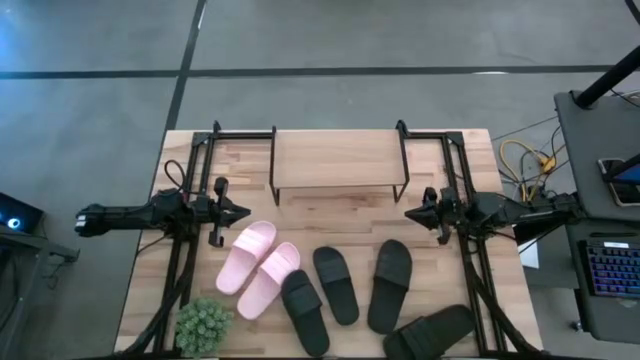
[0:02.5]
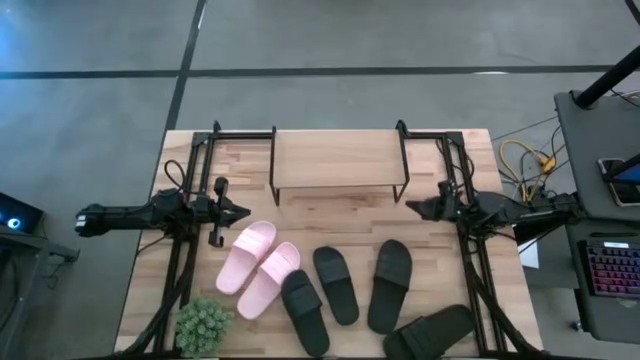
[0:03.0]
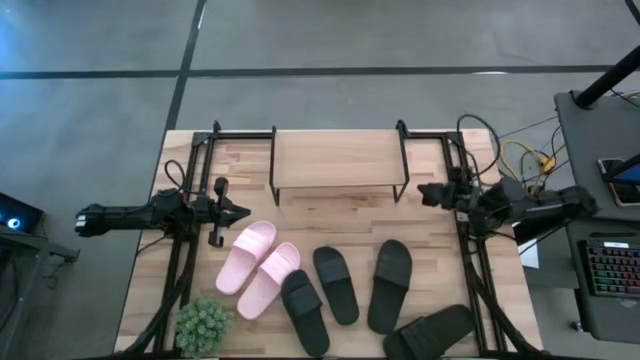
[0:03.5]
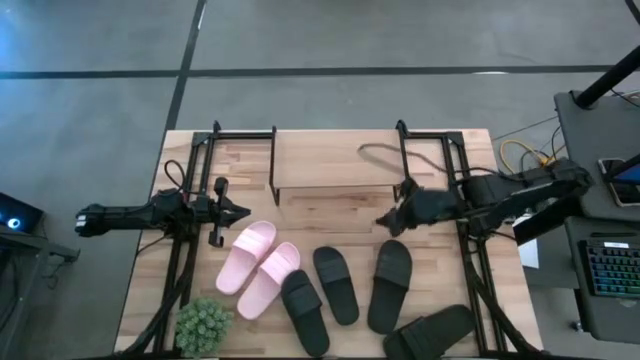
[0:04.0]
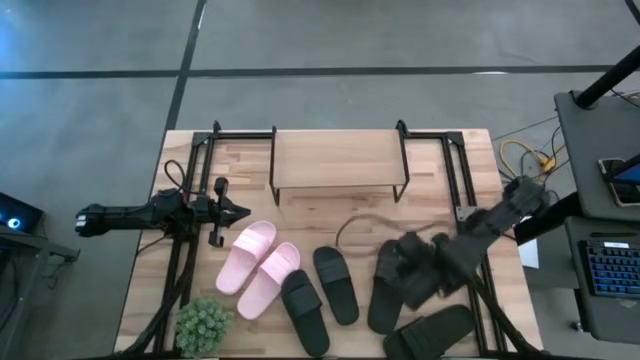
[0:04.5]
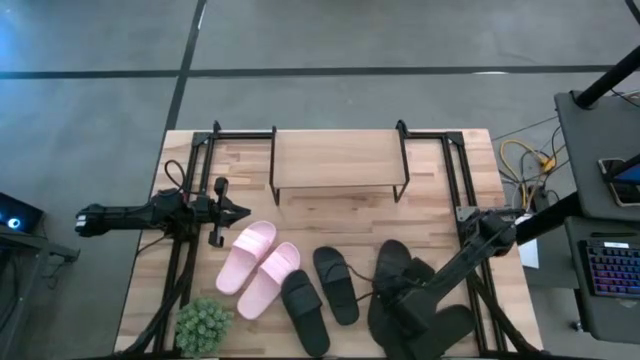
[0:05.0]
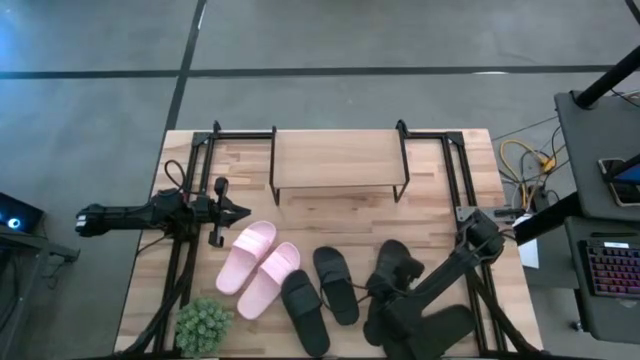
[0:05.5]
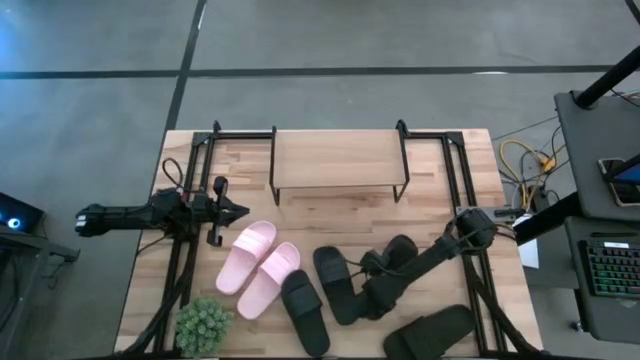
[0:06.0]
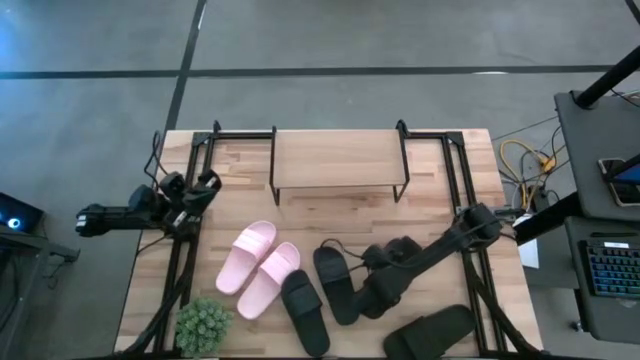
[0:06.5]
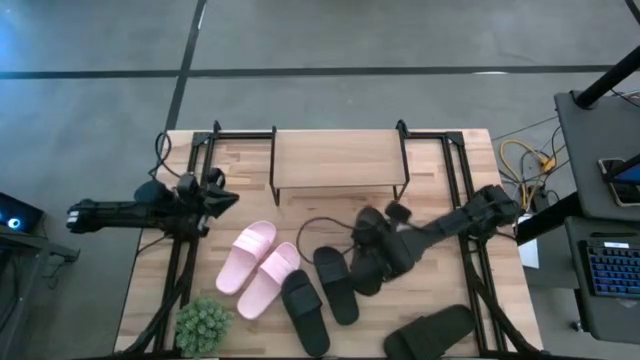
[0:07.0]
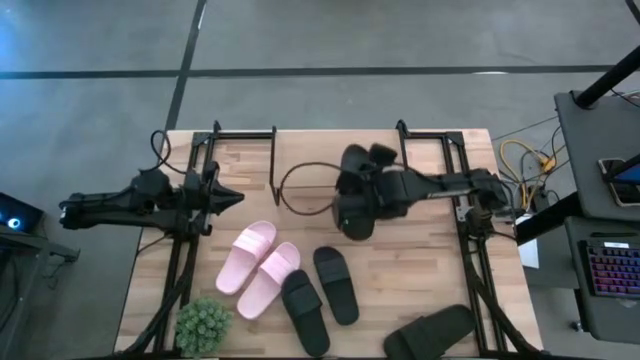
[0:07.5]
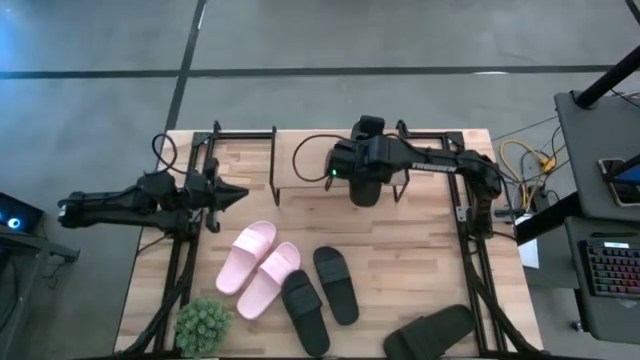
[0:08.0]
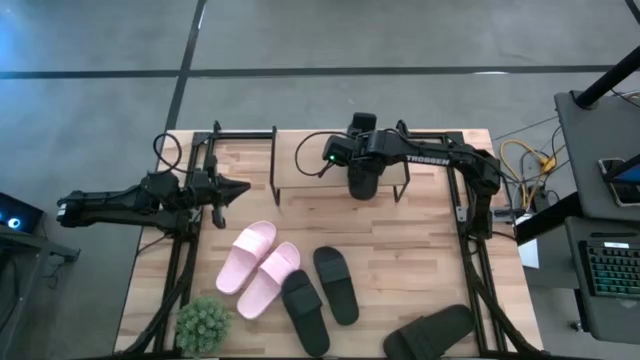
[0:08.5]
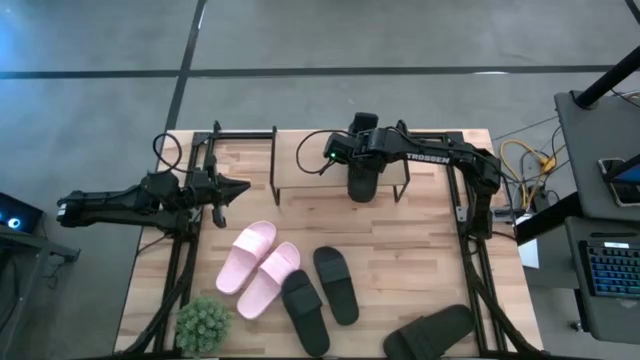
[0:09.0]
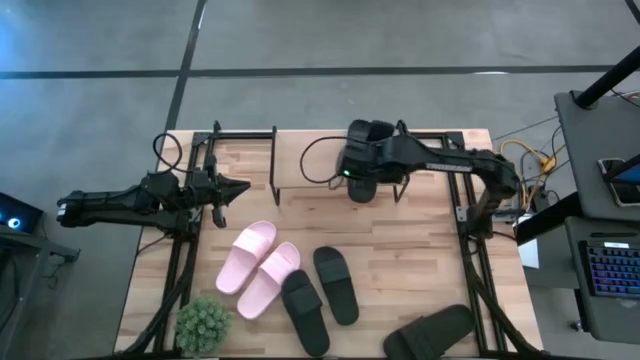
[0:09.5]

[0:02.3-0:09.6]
Task: Pick and place slides into the shelf
Put the black slide on the shelf

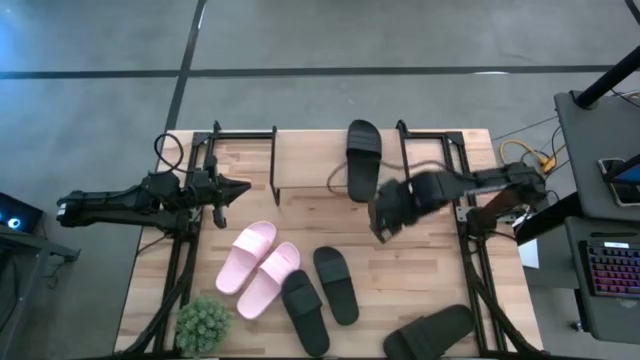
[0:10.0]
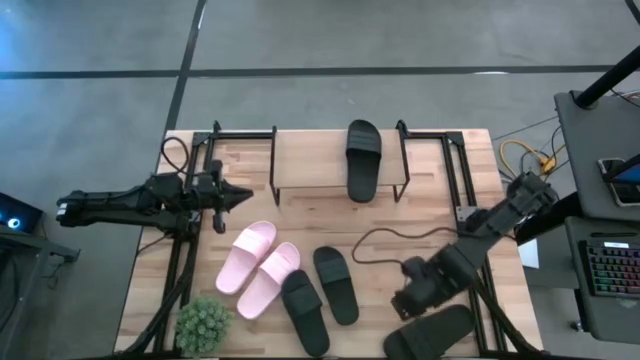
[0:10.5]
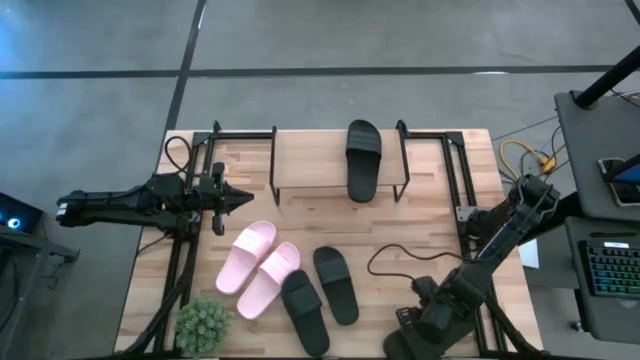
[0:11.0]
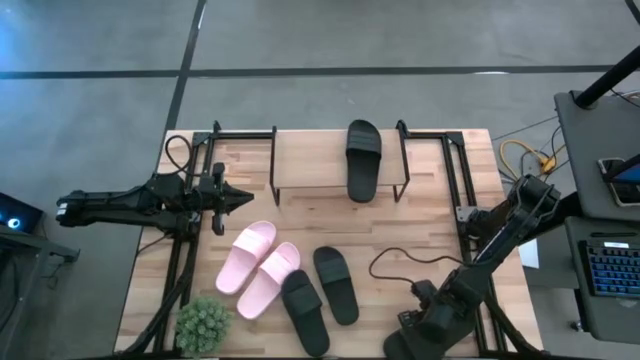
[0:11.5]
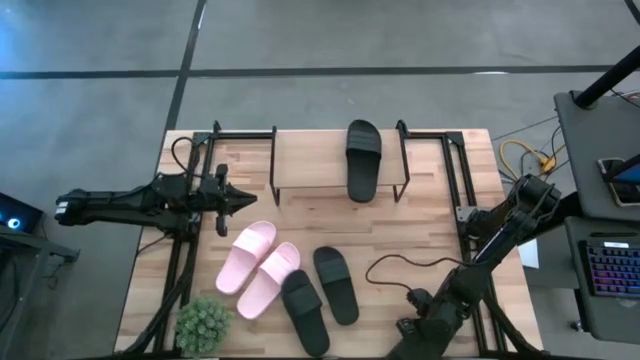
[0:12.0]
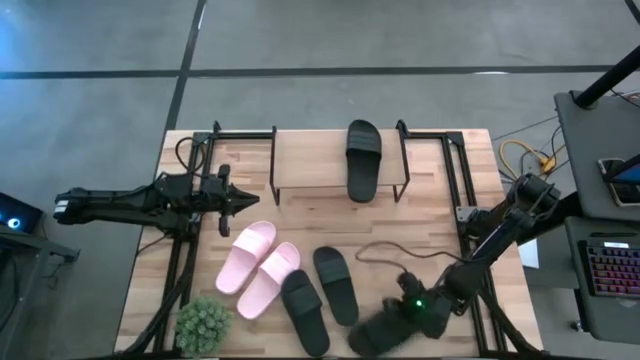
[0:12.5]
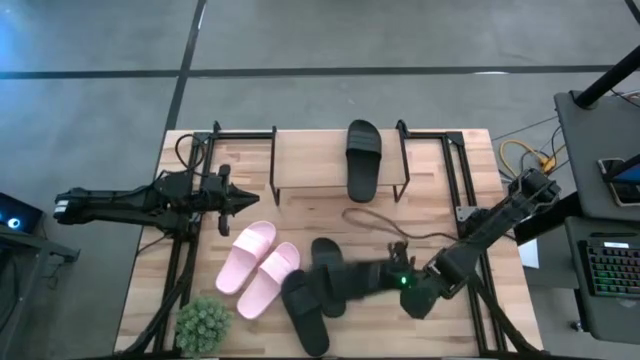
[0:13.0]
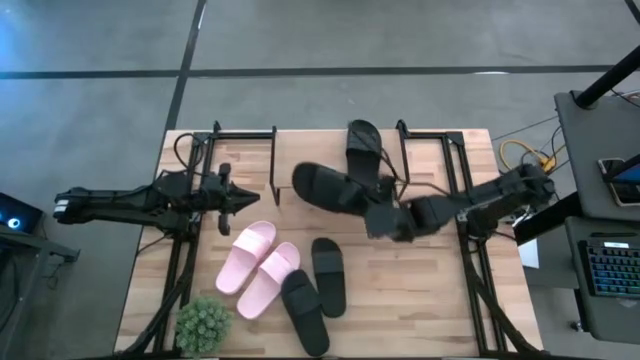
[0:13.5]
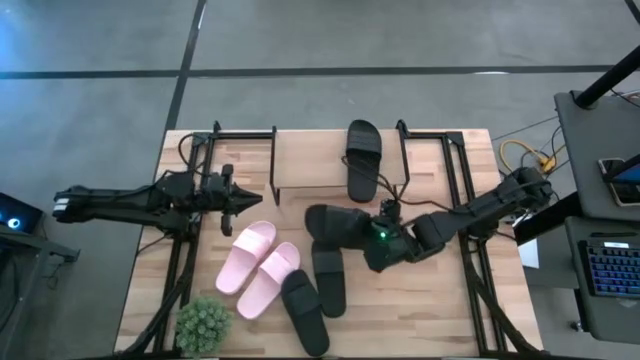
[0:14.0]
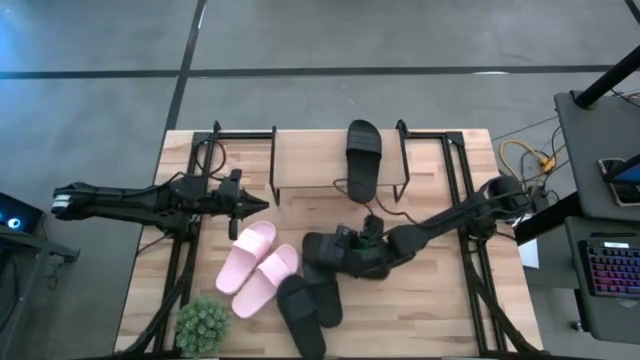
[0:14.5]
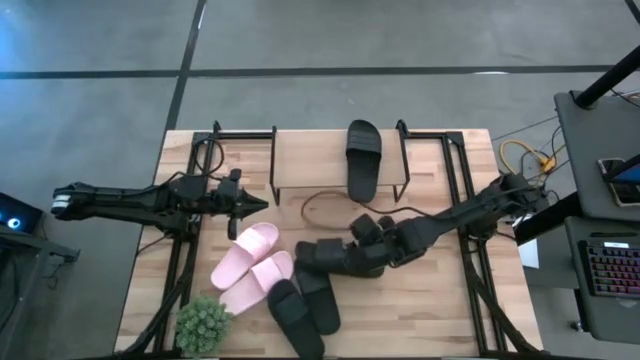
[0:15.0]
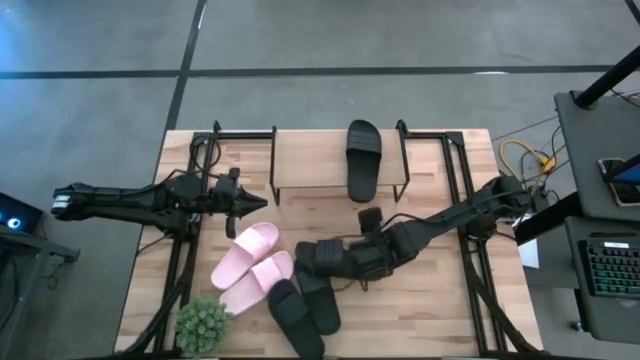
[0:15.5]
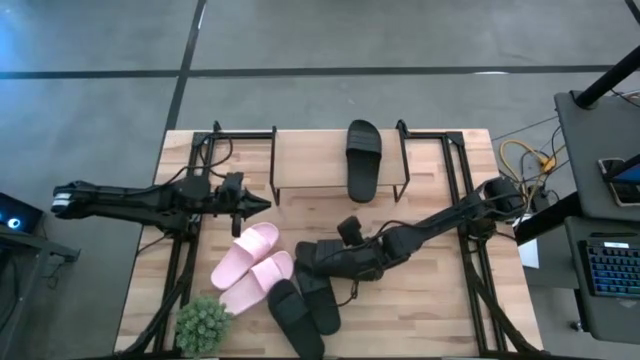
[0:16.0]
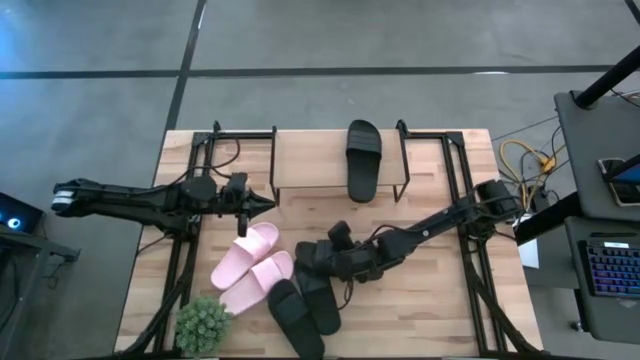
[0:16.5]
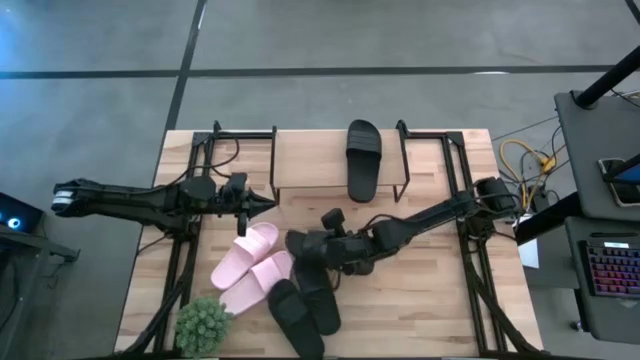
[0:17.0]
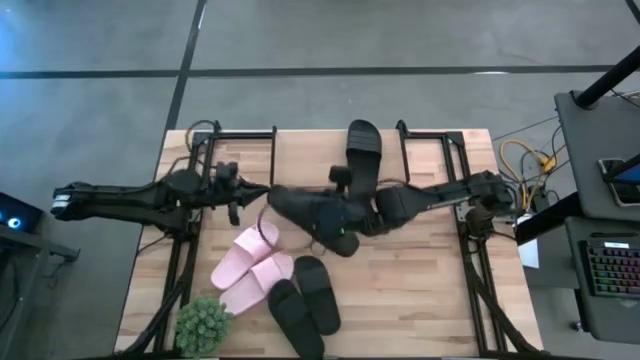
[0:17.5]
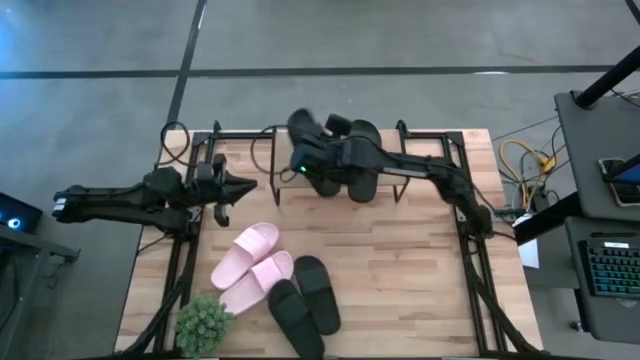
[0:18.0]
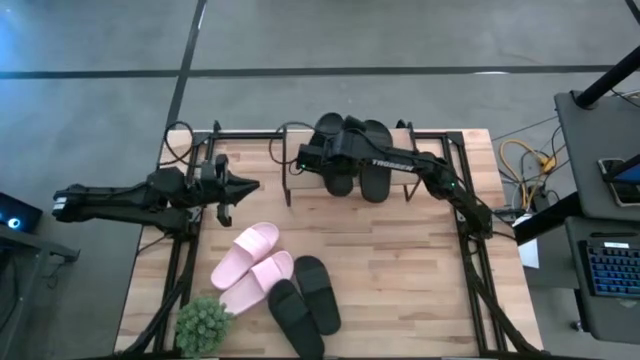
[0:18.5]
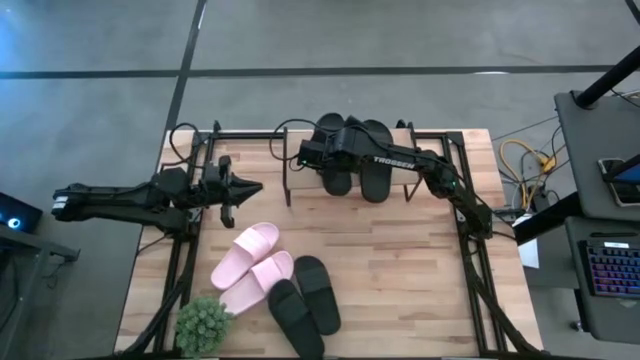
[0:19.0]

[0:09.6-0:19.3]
Put the bottom right black slide on the shelf

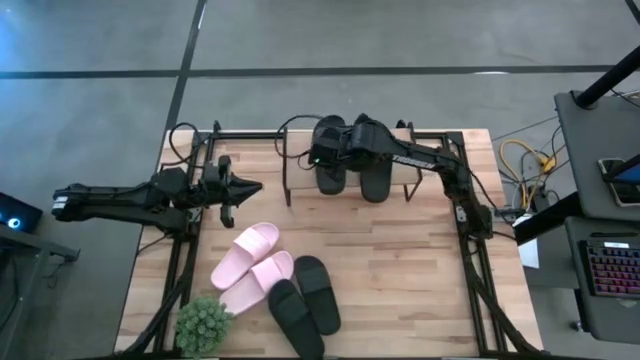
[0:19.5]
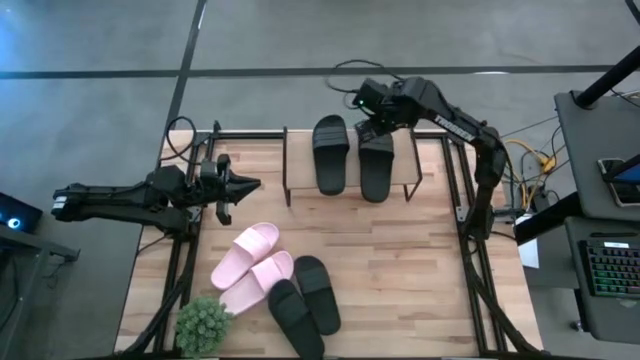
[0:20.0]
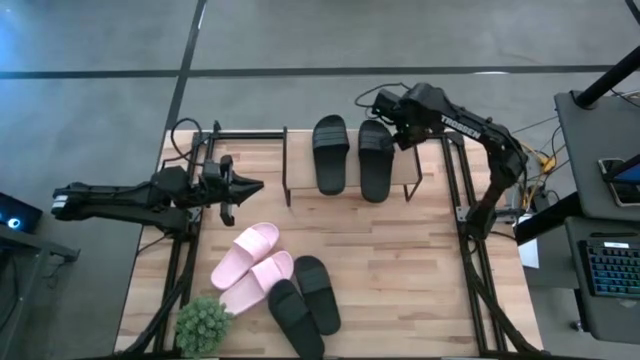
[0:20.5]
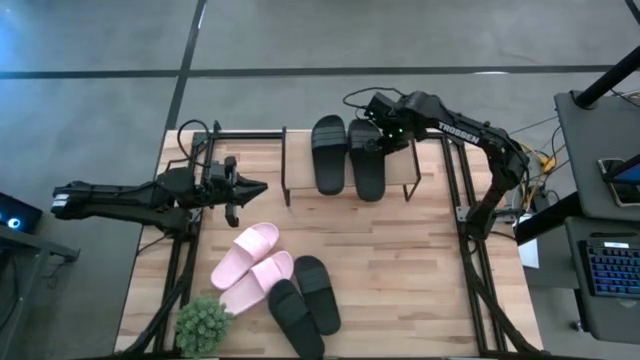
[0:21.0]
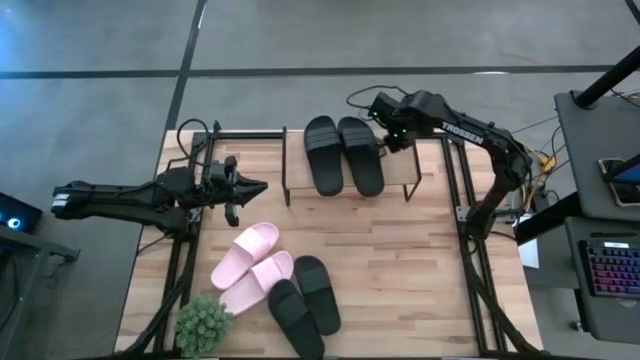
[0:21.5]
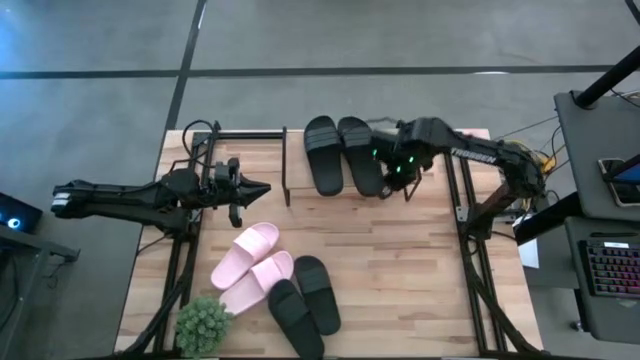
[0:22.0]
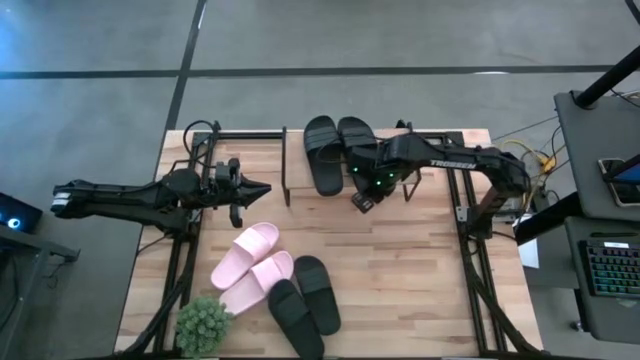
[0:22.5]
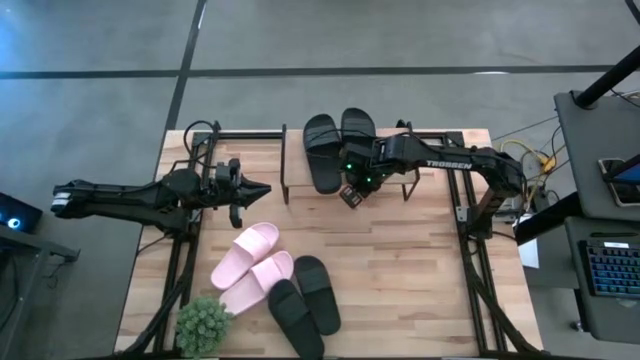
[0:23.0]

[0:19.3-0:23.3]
Adjust the right black slide on the shelf
